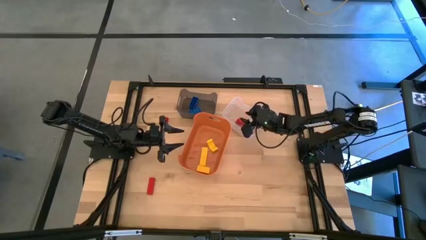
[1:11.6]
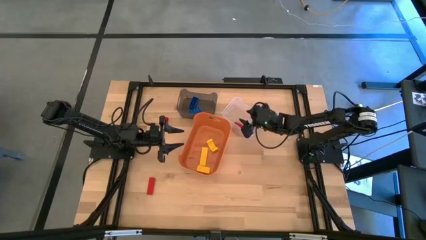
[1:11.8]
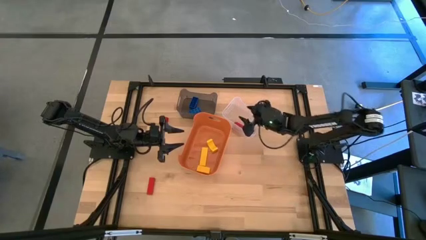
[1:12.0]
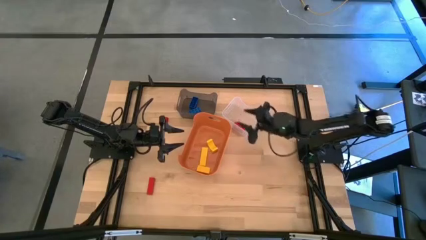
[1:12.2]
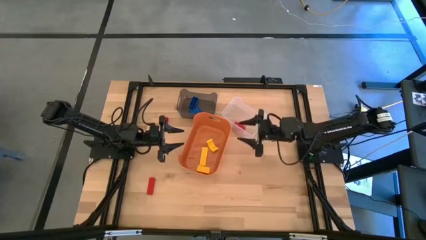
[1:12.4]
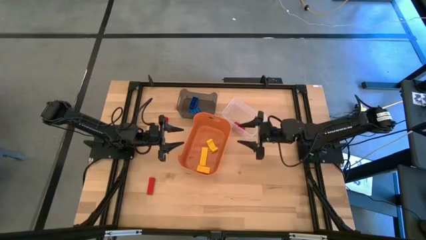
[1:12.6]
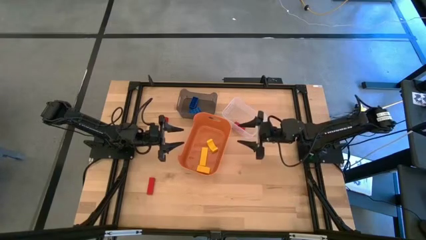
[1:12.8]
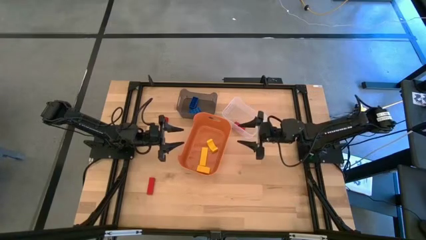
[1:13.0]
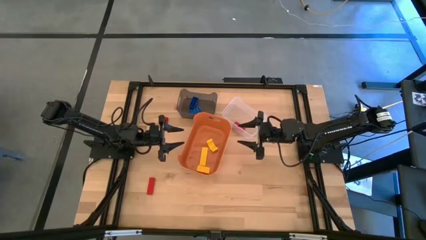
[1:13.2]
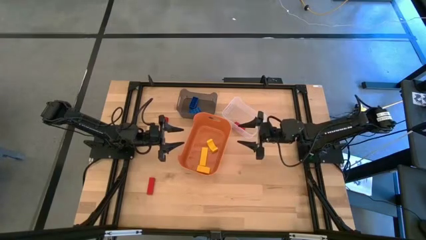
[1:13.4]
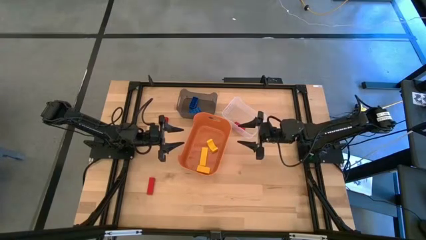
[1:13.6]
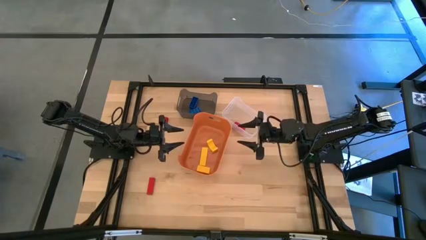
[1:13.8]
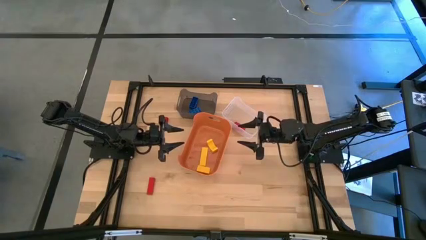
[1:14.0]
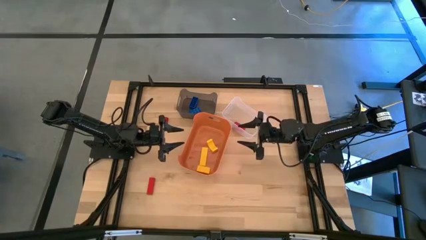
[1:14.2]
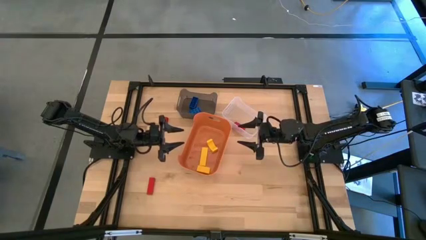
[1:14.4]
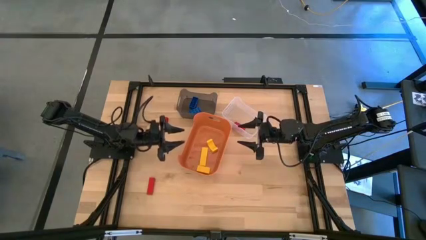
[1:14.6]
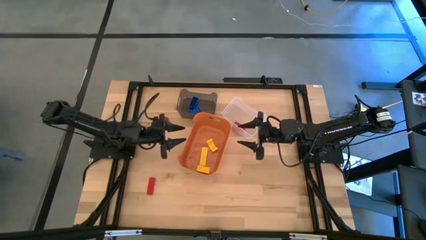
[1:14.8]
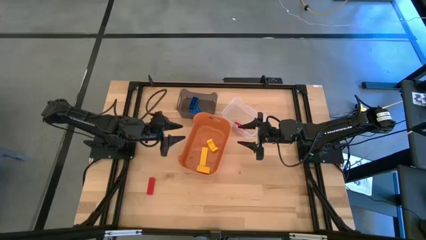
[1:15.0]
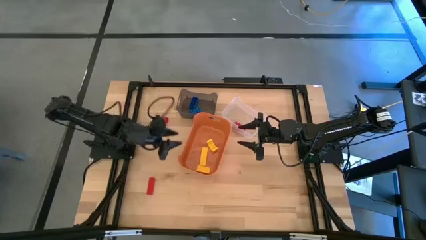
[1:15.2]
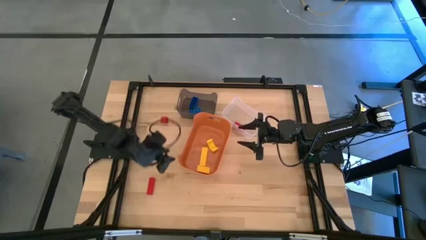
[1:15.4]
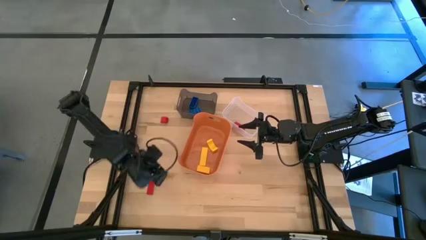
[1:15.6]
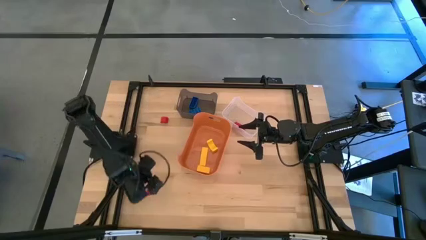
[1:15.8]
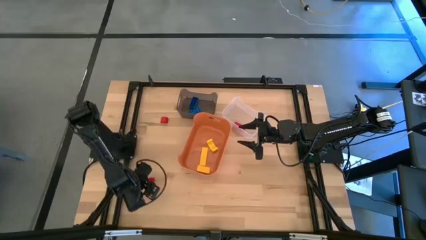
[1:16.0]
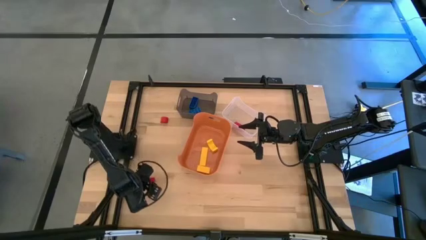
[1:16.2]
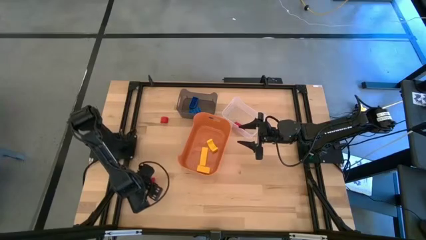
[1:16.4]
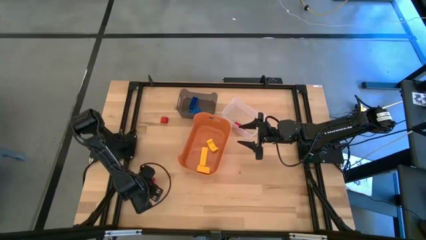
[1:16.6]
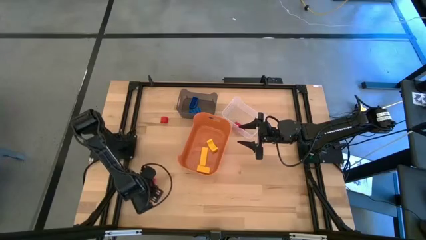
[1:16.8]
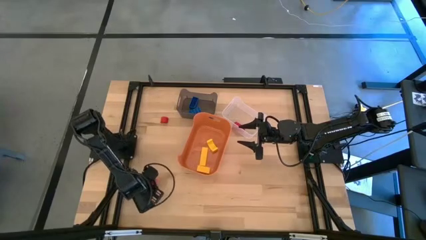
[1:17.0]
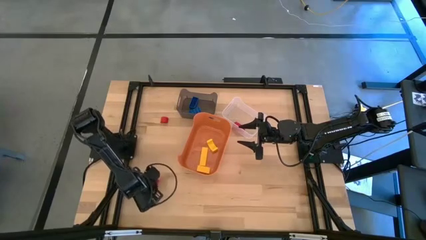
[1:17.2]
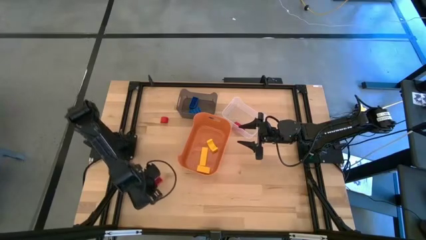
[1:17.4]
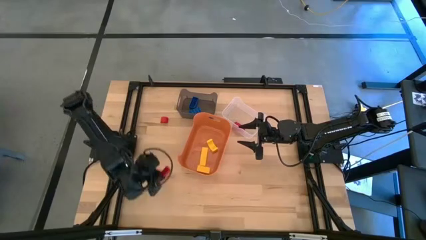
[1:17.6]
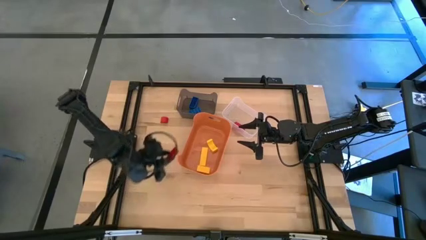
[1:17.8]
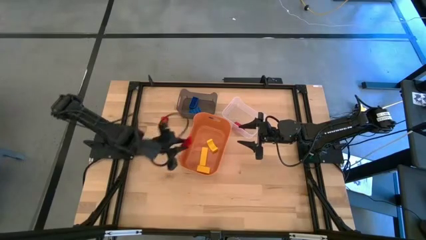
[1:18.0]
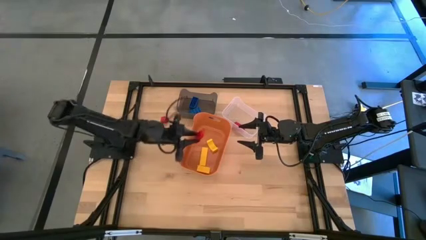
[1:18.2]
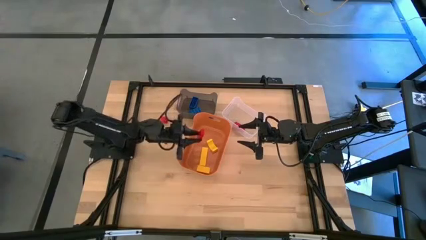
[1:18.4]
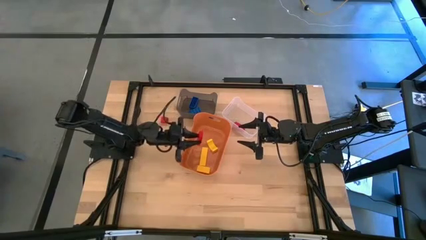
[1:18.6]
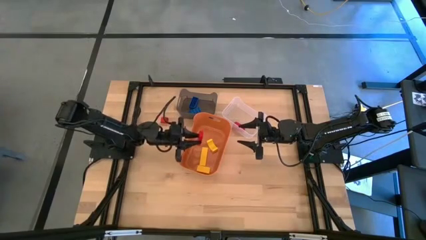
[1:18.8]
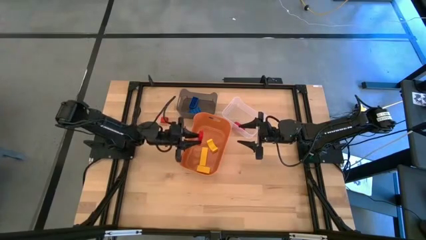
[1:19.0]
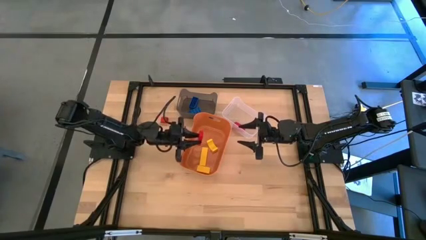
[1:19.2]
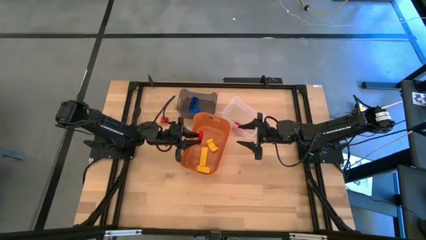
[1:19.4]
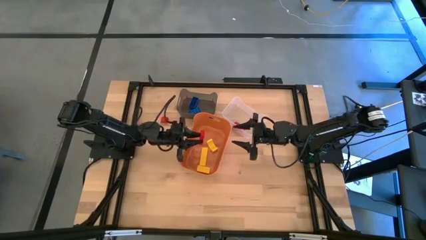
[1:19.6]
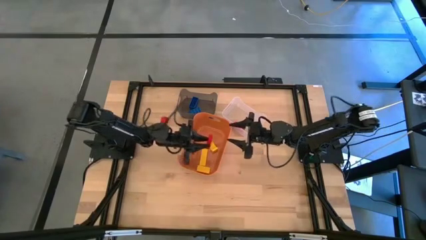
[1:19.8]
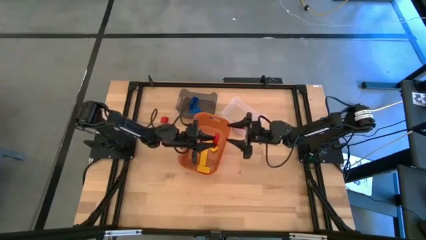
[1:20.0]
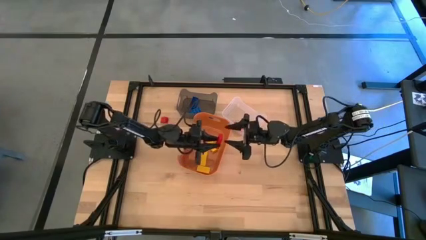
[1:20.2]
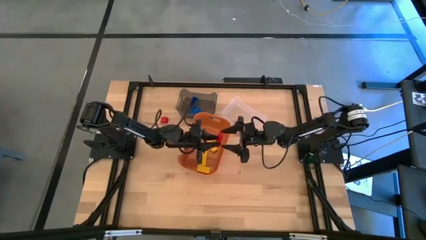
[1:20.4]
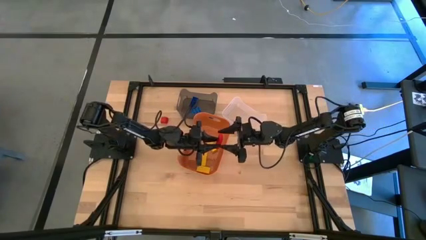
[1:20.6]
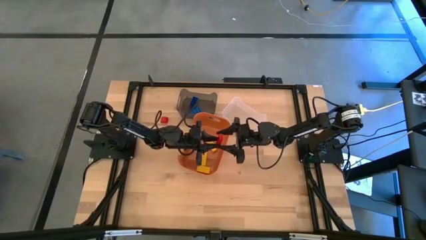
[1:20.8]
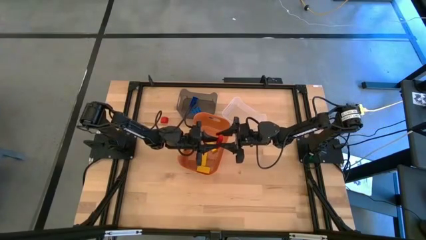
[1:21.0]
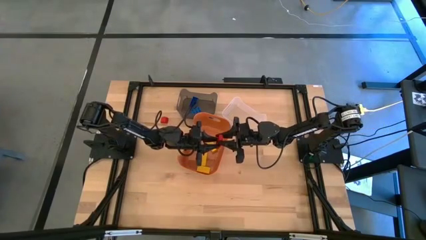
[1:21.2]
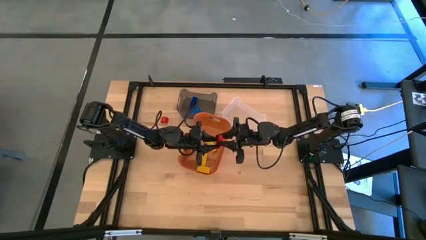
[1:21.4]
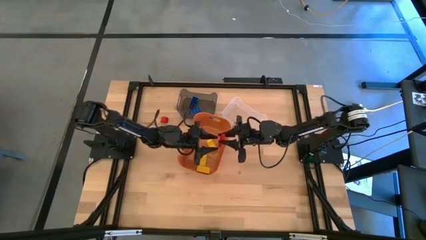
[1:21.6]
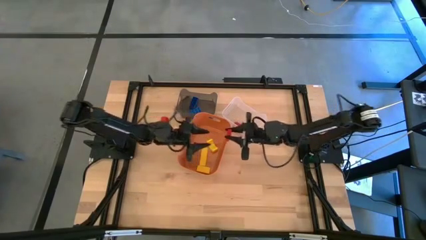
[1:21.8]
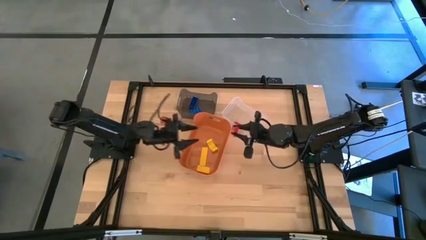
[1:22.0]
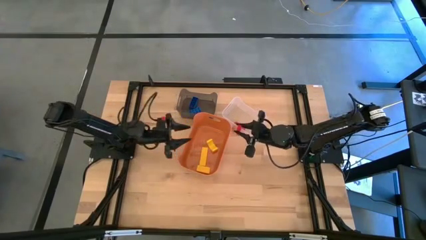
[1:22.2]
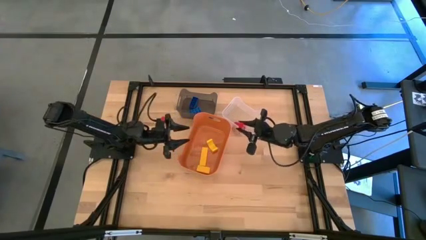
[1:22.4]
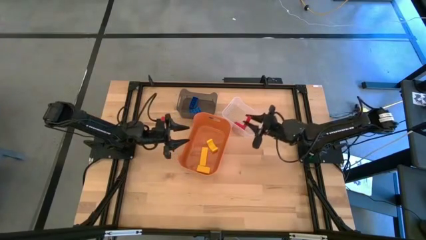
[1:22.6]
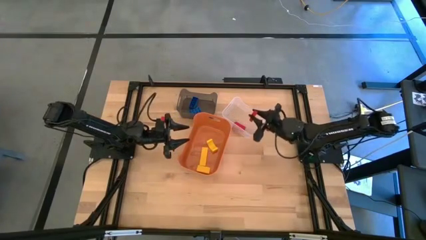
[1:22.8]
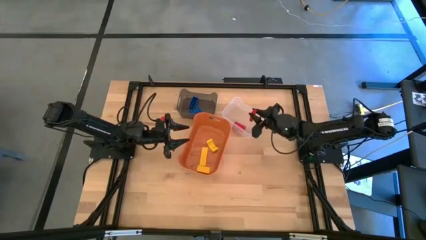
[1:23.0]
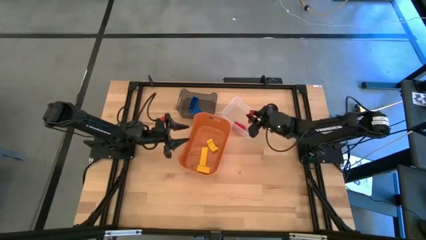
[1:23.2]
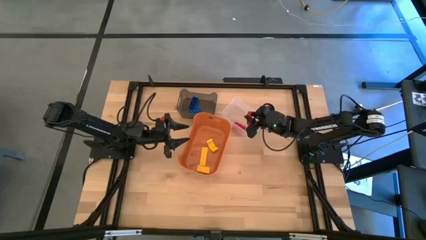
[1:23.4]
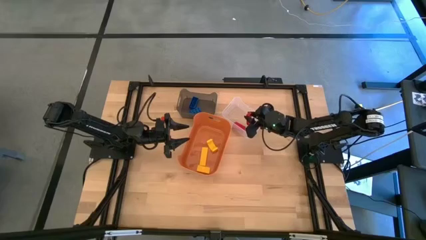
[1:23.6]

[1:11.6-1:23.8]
Task: Sort & place blocks by color
Put the bottom red block into the transparent bin

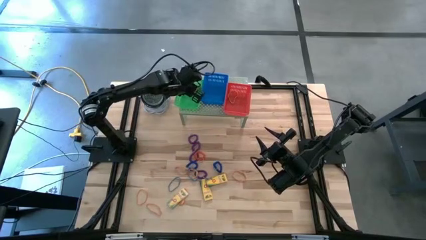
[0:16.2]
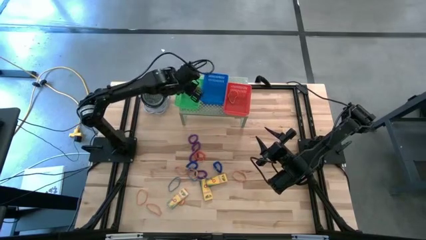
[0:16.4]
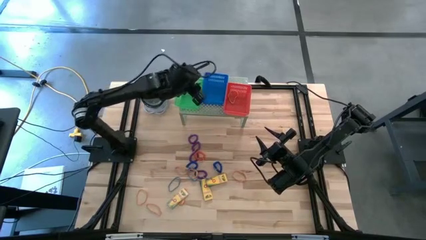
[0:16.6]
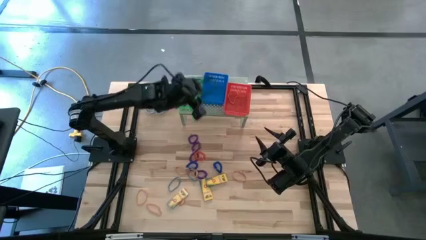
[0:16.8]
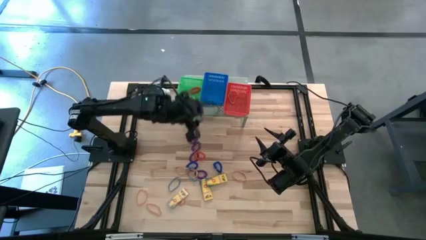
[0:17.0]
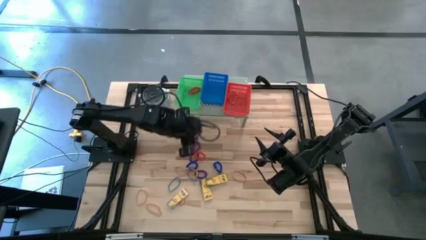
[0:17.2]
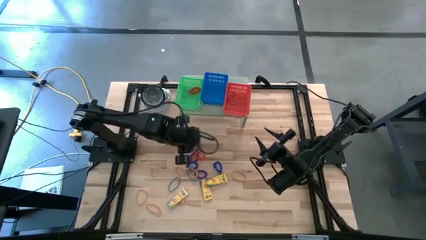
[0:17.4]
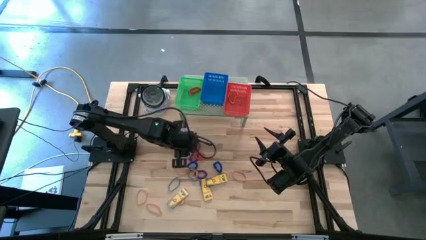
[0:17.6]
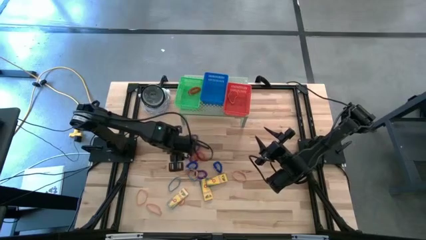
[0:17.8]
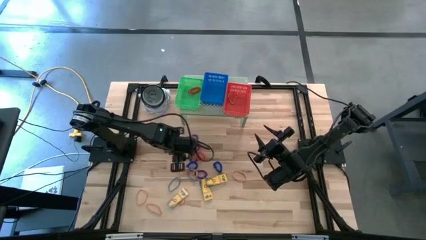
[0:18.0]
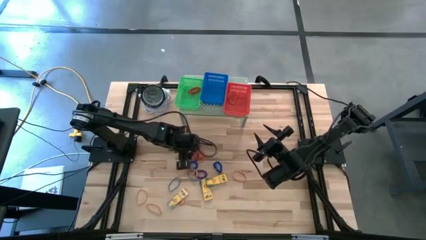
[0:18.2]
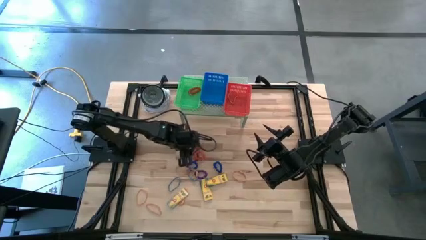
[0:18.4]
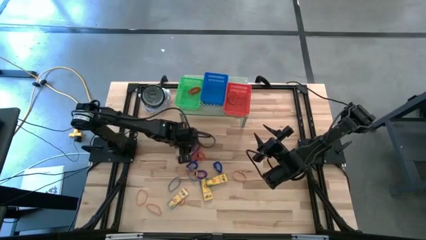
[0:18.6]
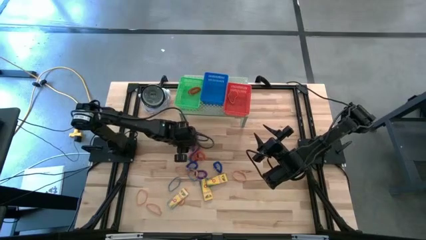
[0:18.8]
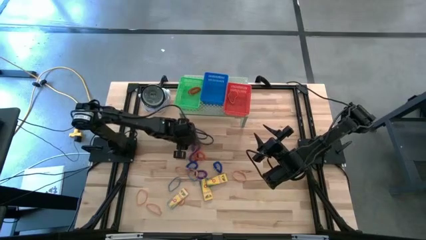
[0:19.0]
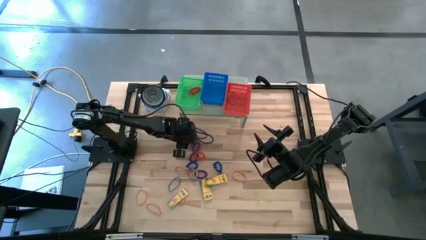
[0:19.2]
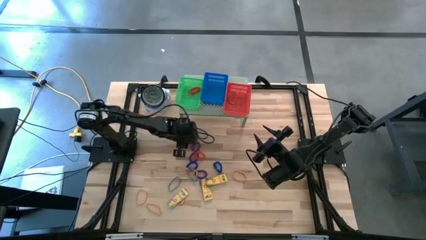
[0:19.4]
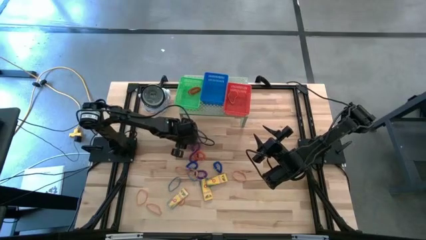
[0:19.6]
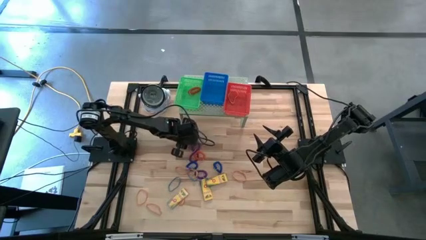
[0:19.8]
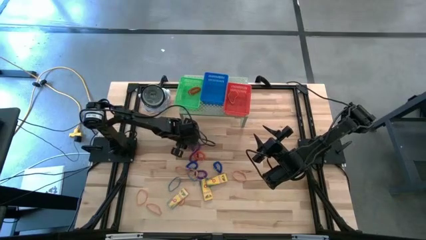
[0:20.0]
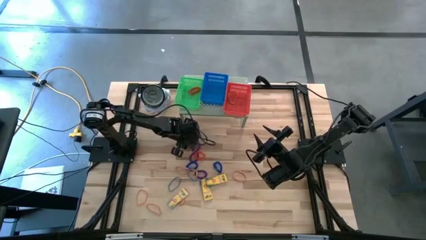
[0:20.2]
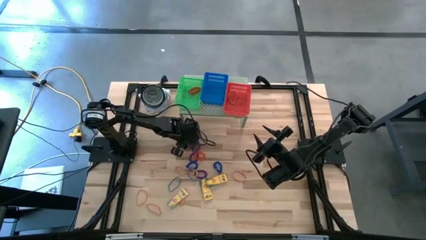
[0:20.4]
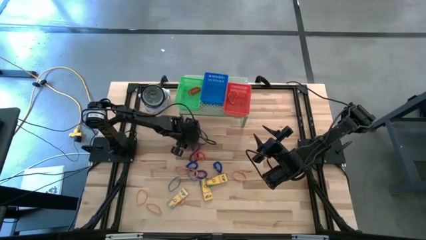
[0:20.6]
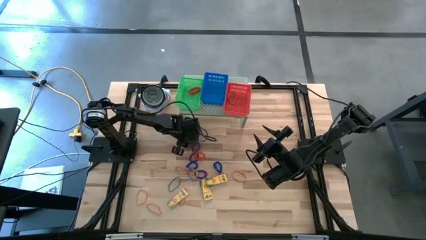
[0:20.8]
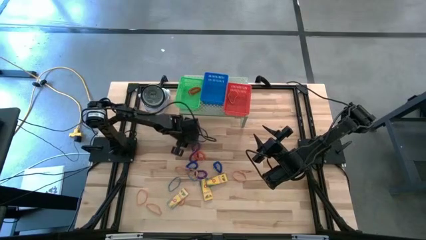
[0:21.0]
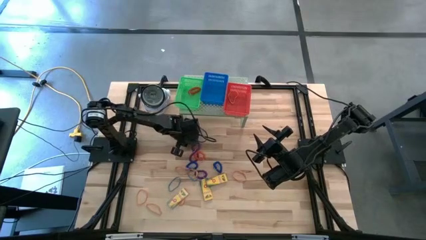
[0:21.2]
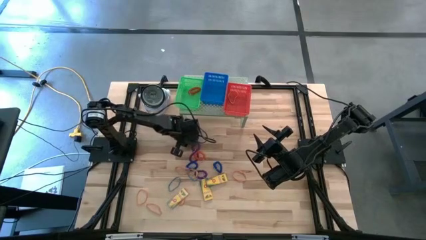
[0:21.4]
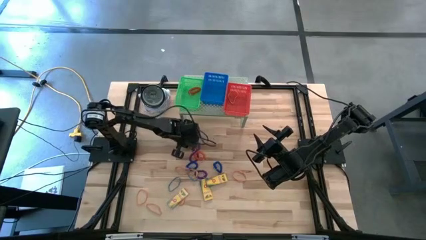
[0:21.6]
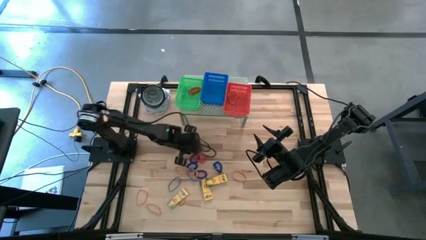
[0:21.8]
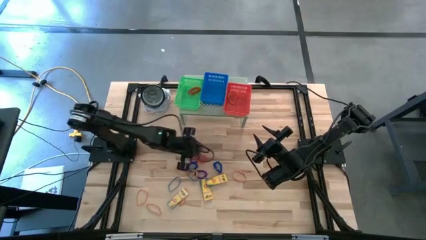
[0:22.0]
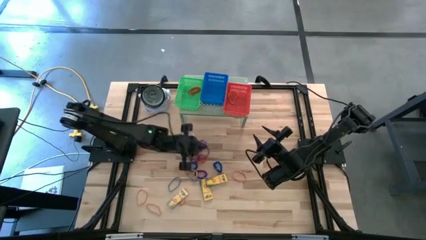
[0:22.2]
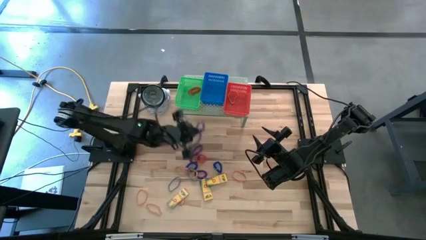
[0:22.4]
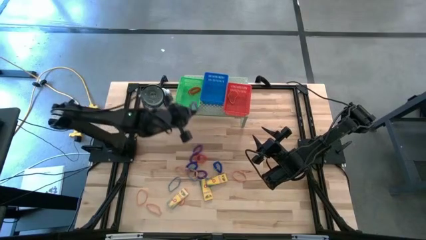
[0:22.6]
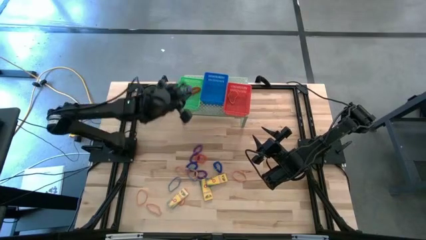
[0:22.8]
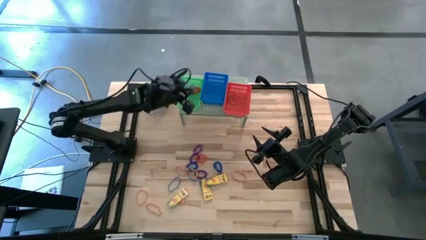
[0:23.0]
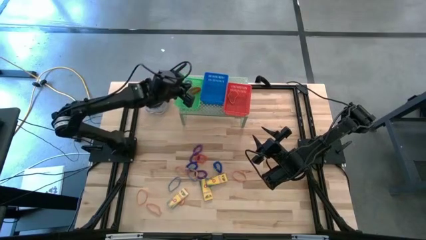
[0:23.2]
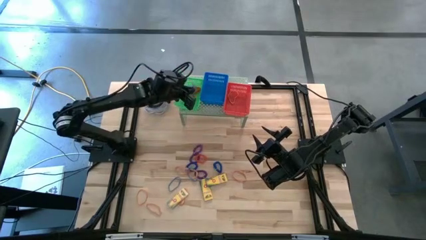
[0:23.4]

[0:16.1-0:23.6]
Task: Pick & Place Office Desk Supplies
Put the violet spring keychain into the green bin on the shelf
